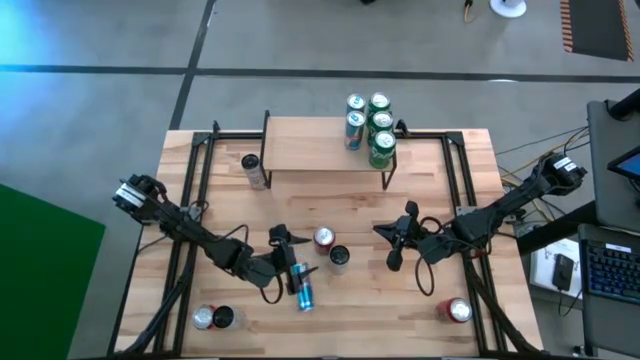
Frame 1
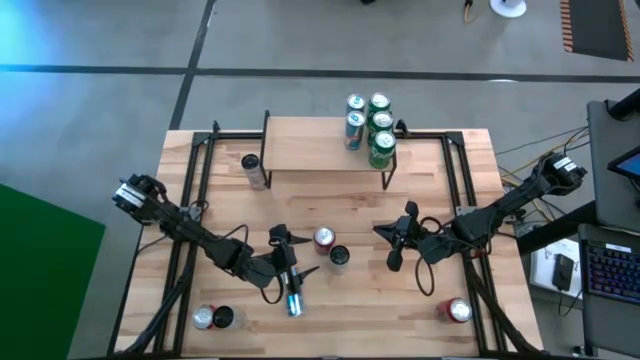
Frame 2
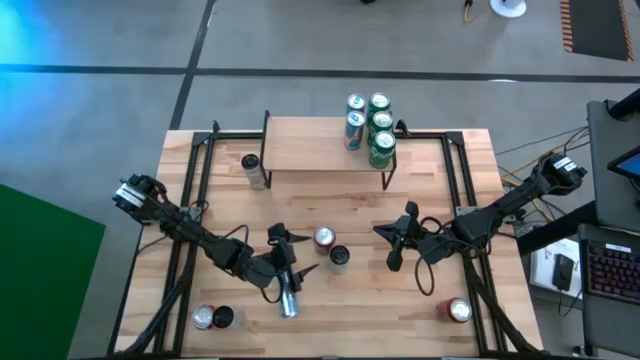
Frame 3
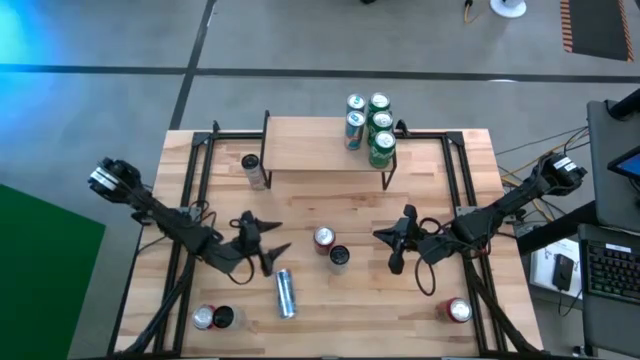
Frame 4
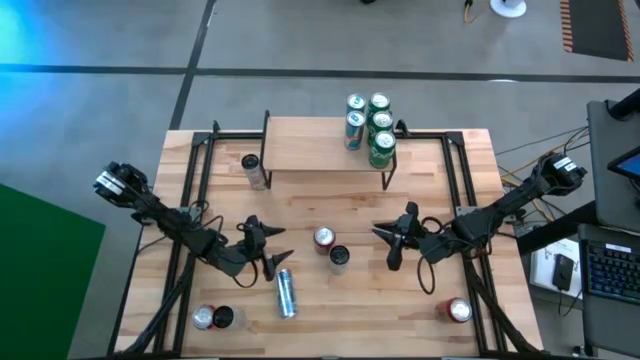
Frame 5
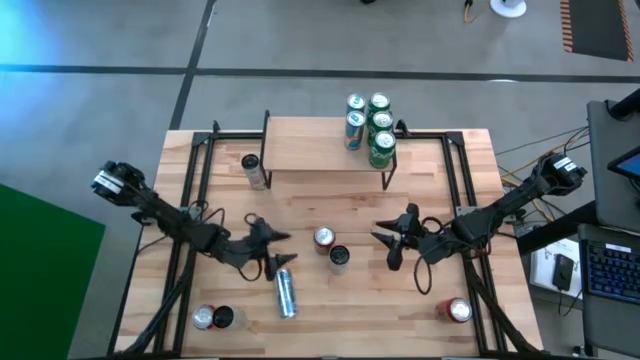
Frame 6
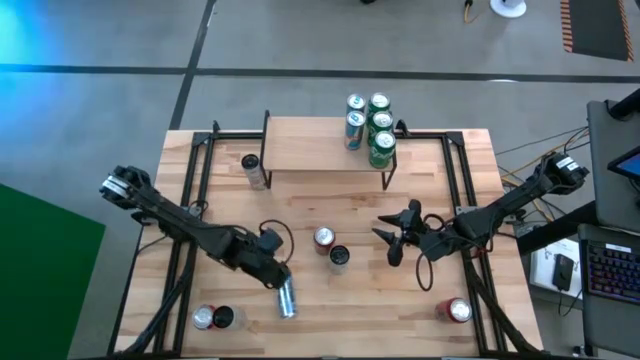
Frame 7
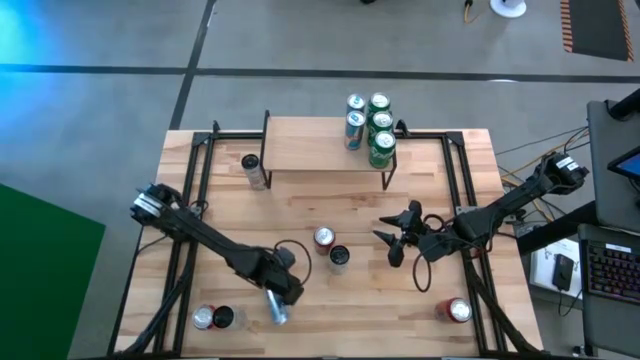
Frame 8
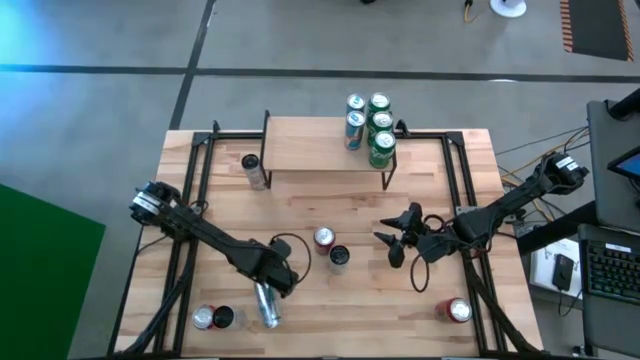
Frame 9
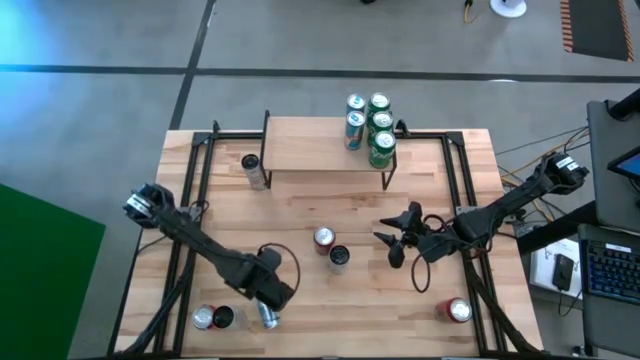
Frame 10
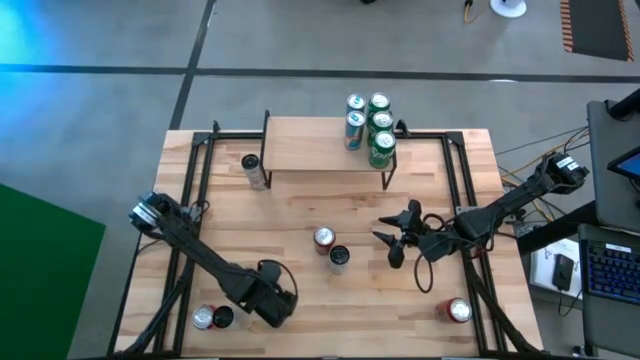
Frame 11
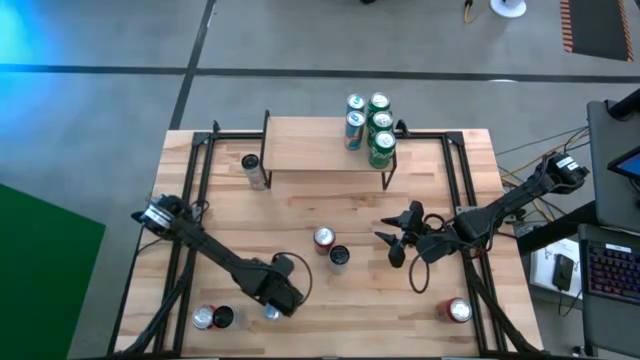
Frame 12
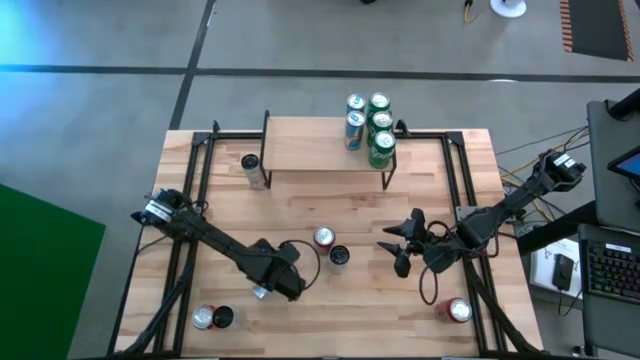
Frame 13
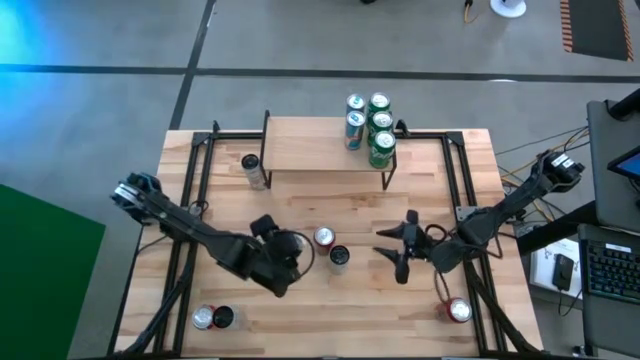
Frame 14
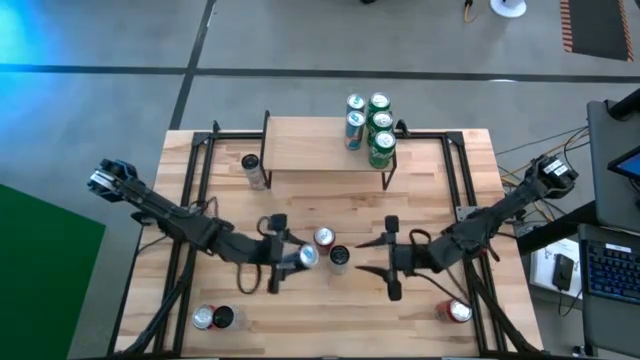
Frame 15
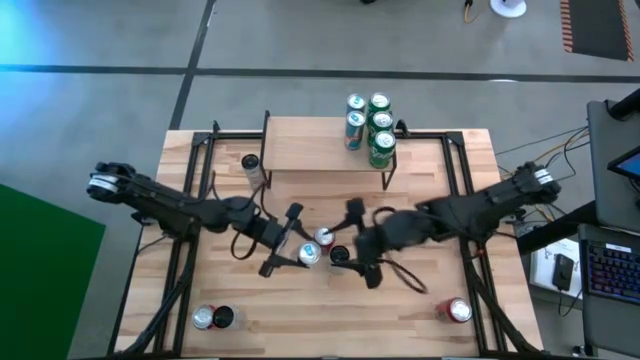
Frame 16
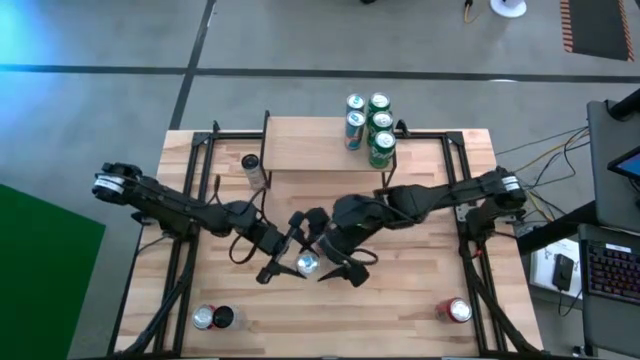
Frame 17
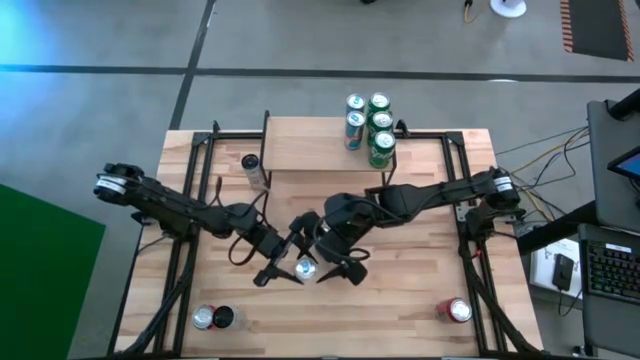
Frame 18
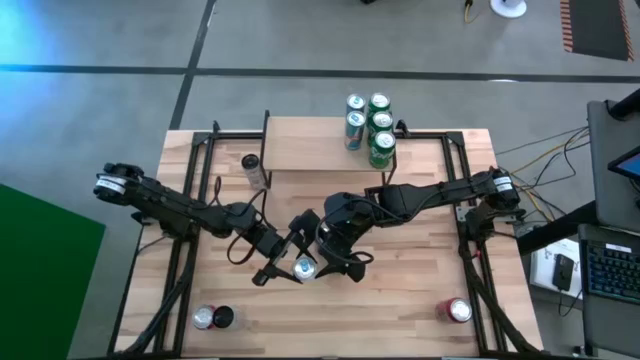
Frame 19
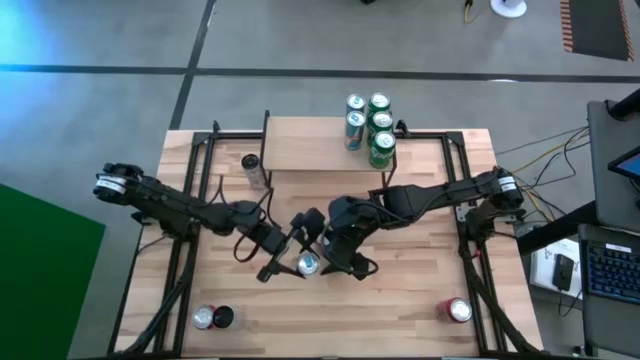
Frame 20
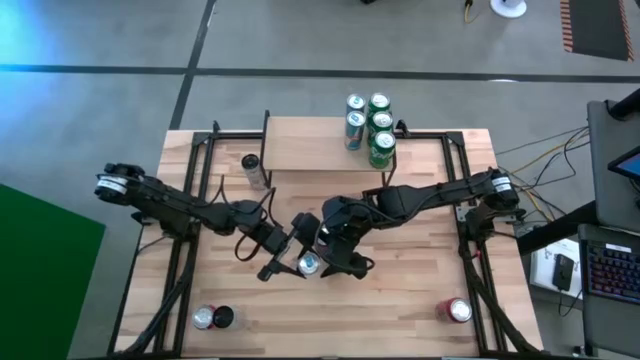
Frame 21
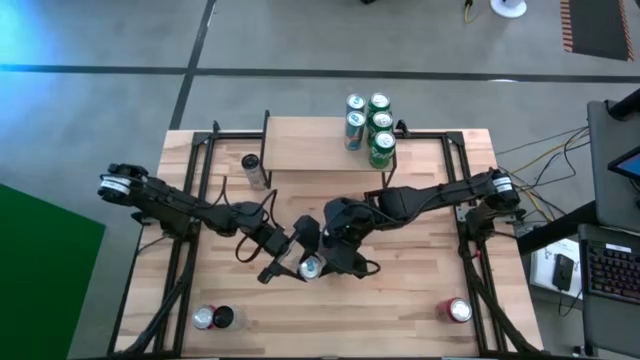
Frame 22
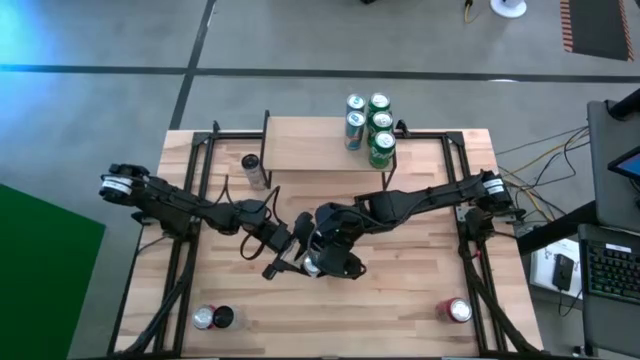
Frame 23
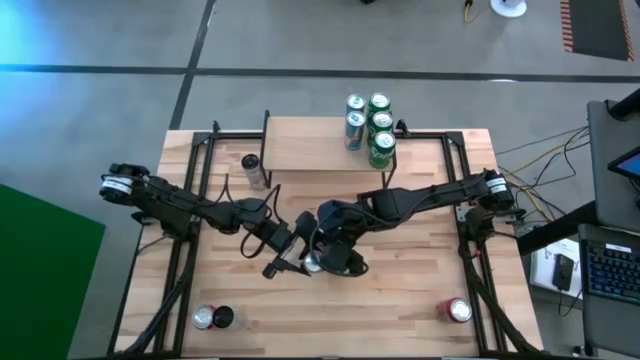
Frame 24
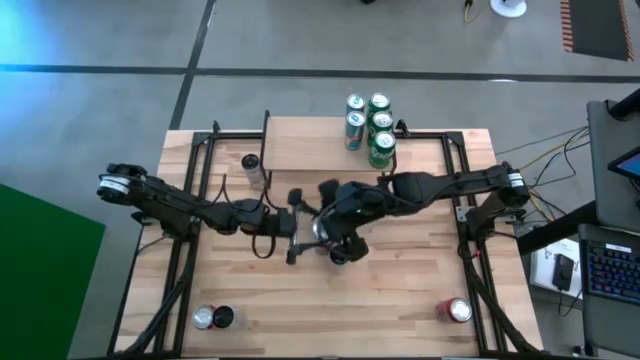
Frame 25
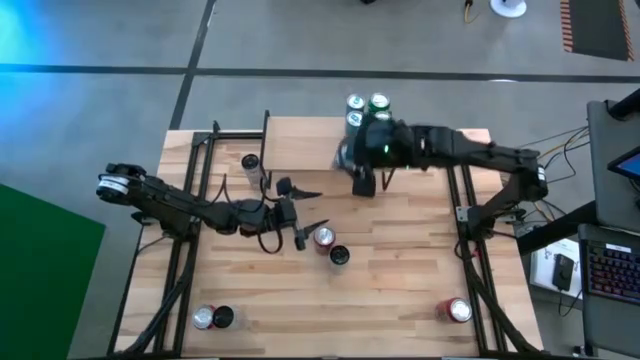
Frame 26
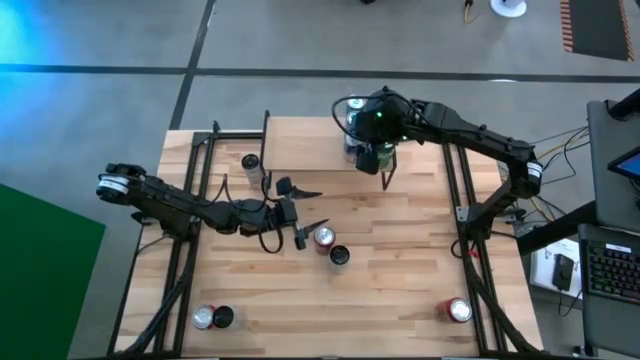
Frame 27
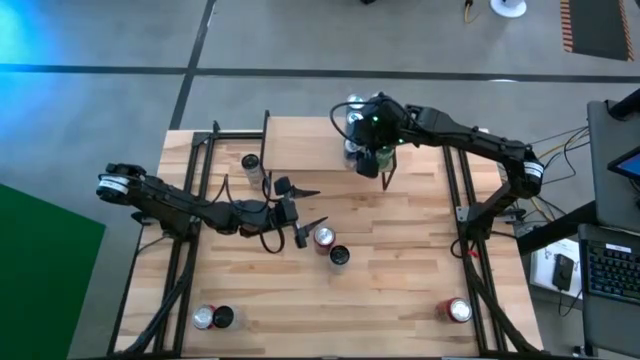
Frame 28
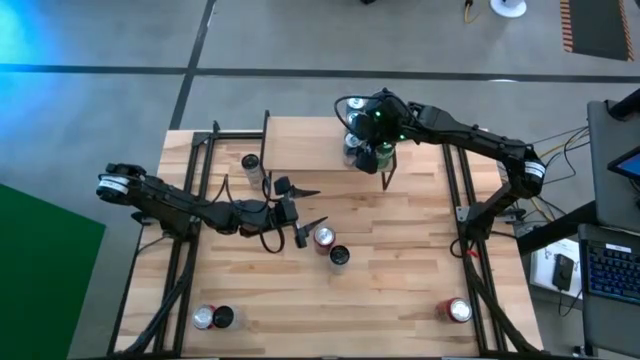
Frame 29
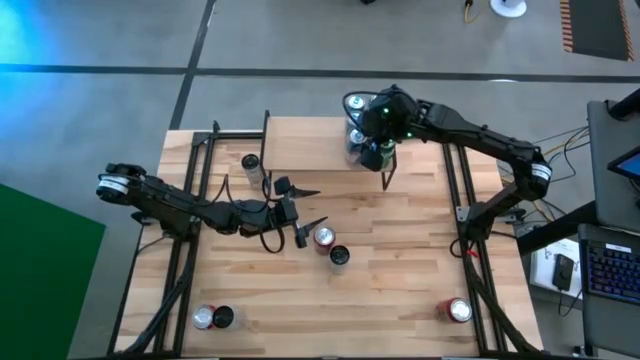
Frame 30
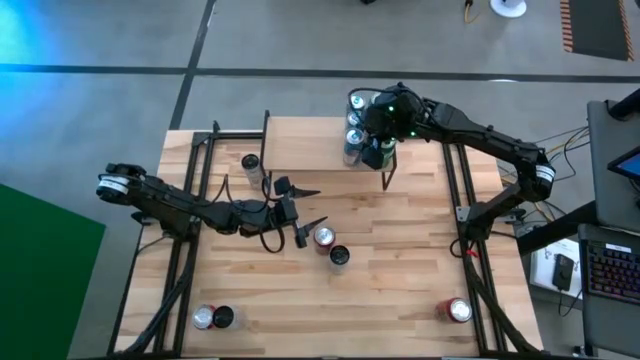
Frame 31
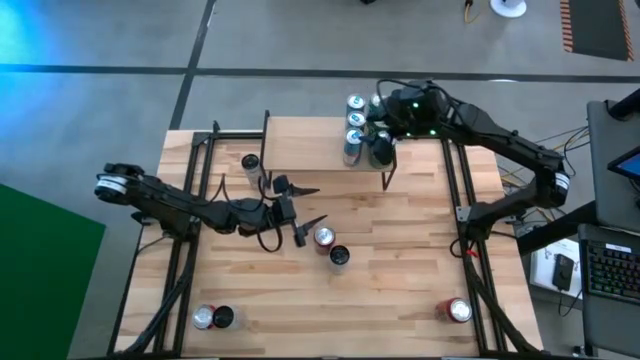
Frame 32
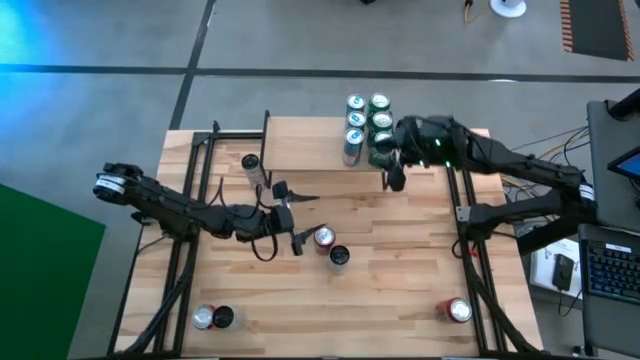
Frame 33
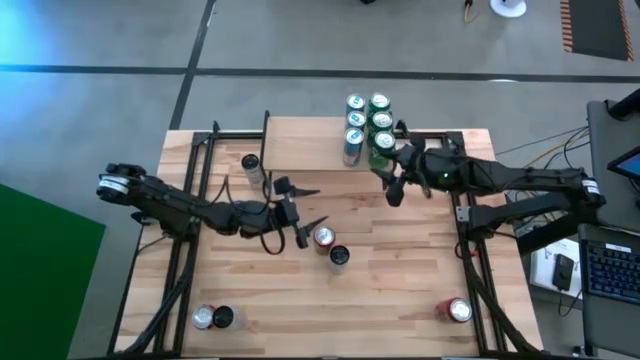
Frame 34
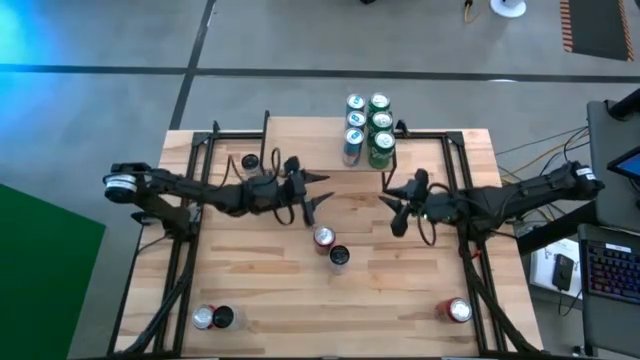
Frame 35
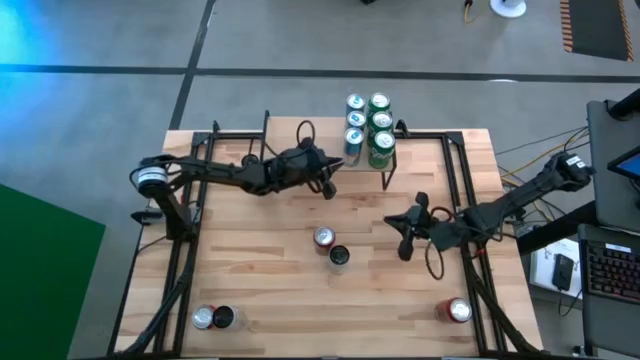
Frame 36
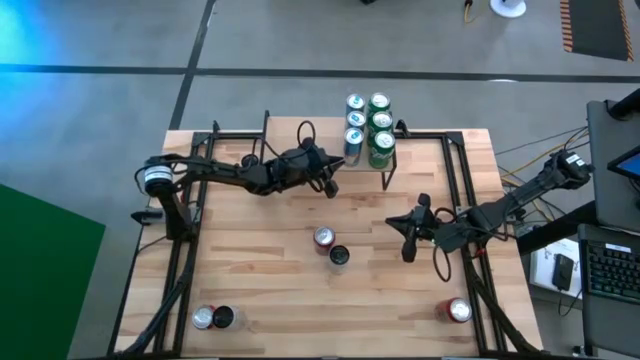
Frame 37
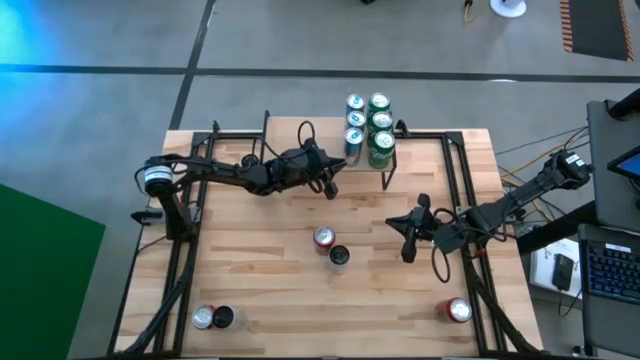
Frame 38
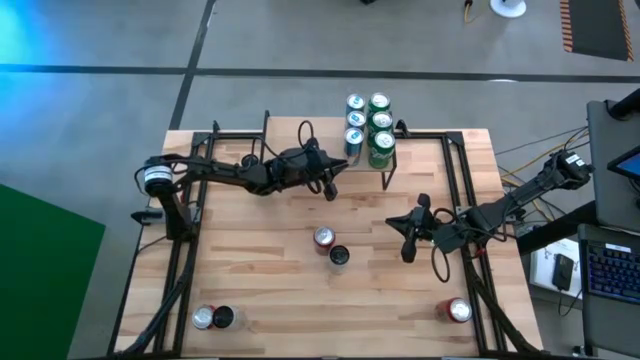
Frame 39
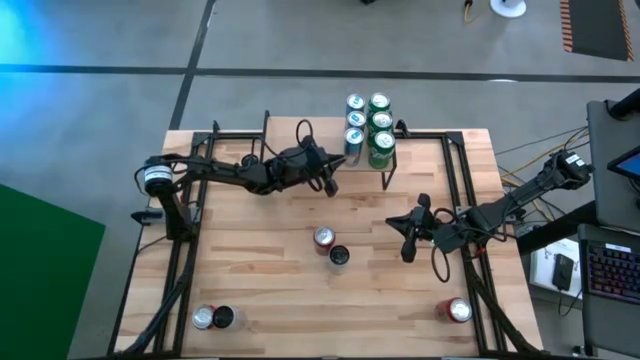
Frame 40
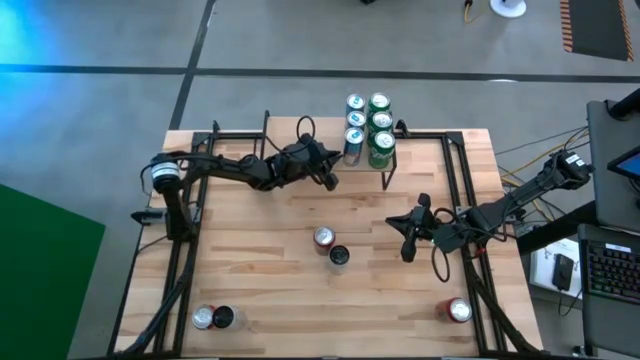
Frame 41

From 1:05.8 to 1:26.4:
Task: Place canned beverage on shelf
Put the blue soda can on the shelf aligned with the other blue soda cans
